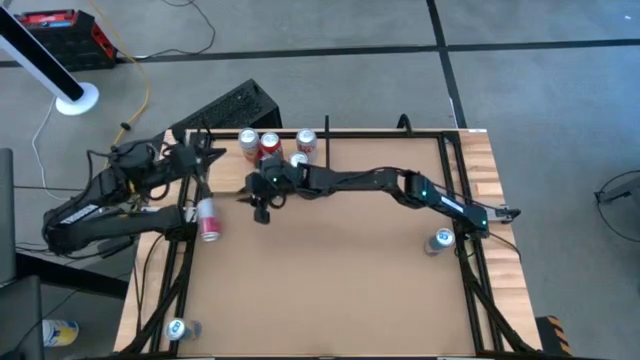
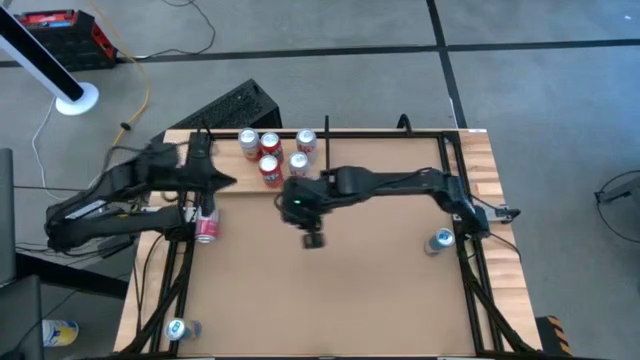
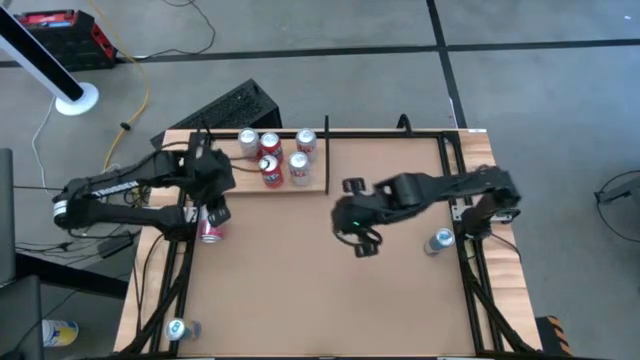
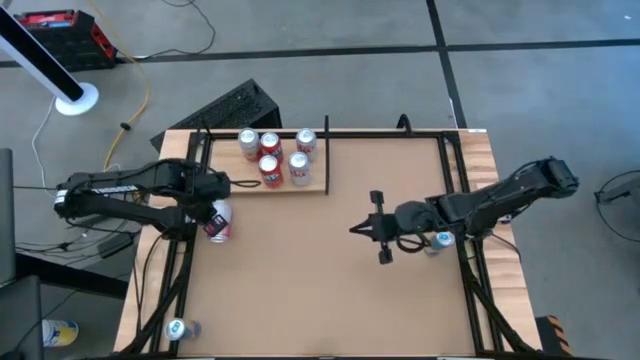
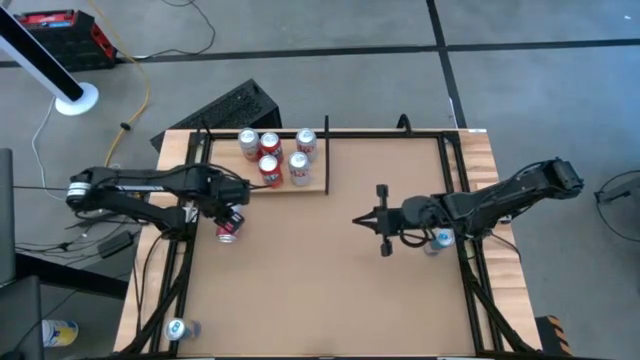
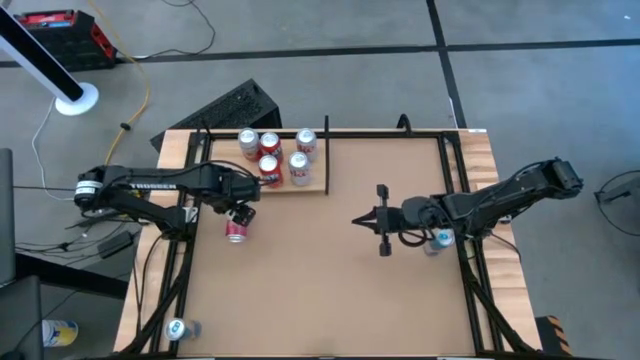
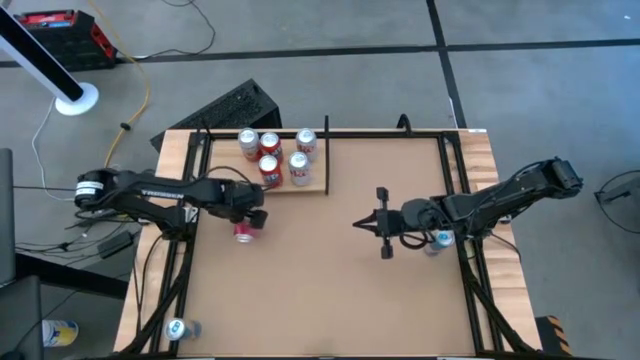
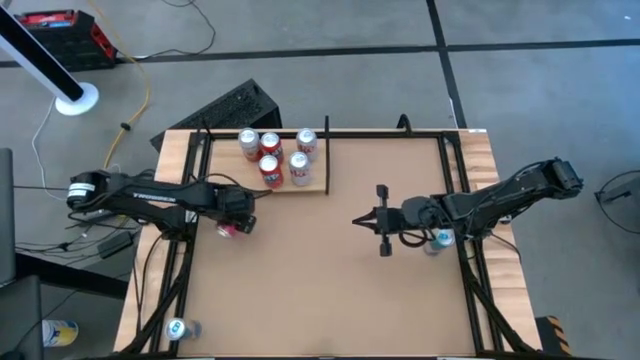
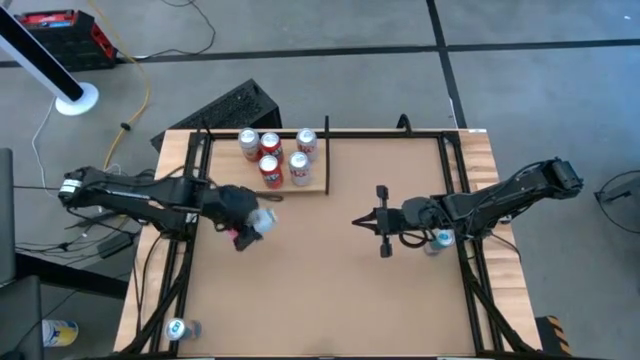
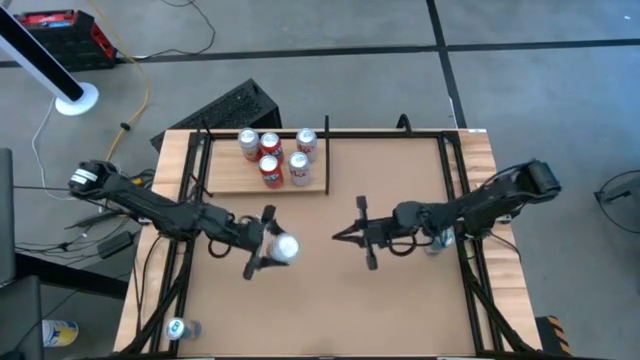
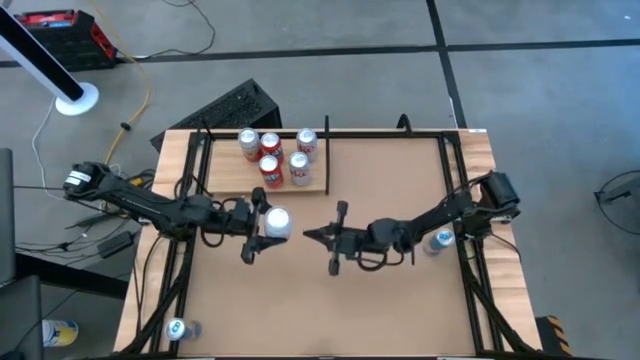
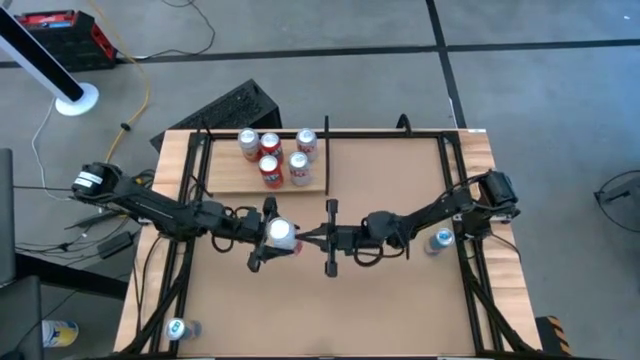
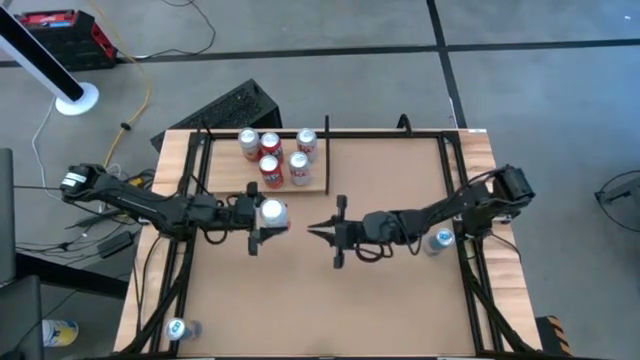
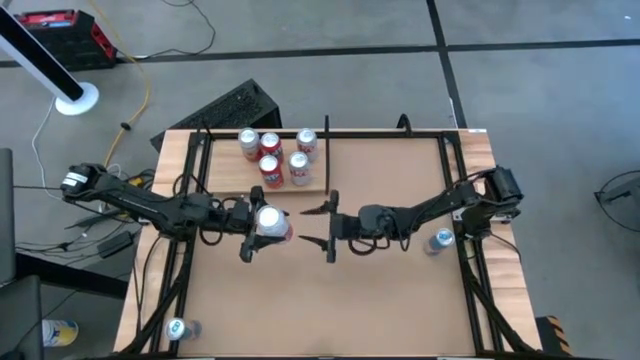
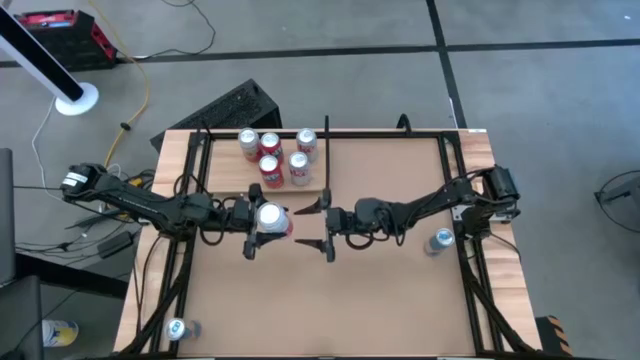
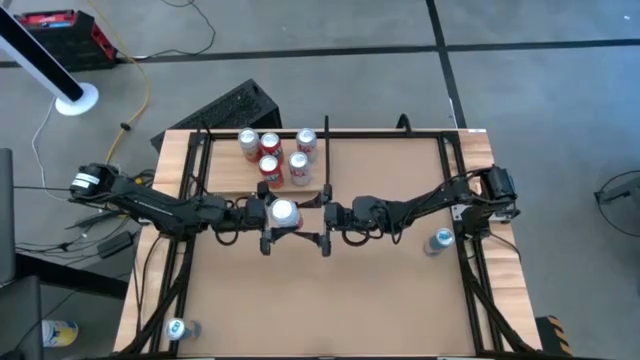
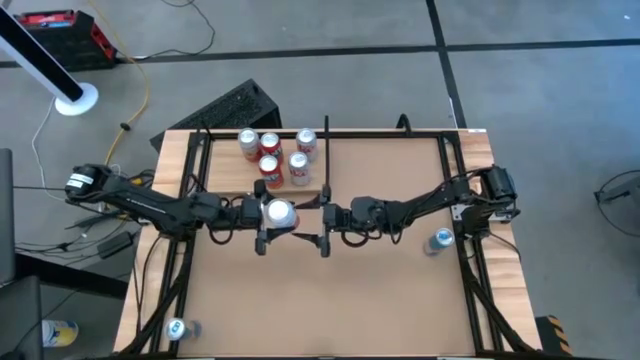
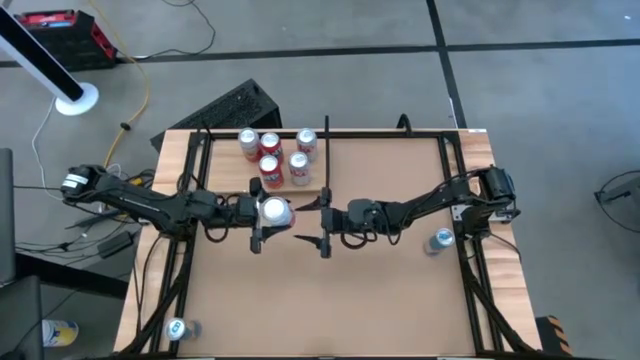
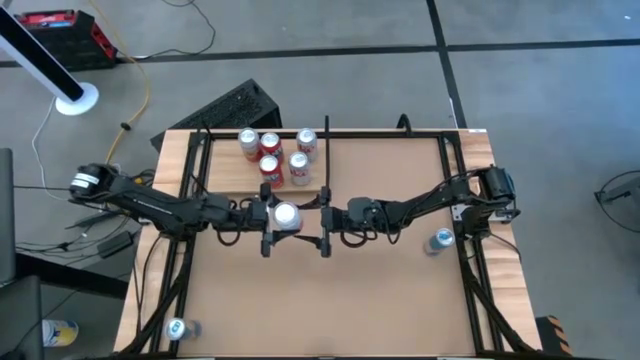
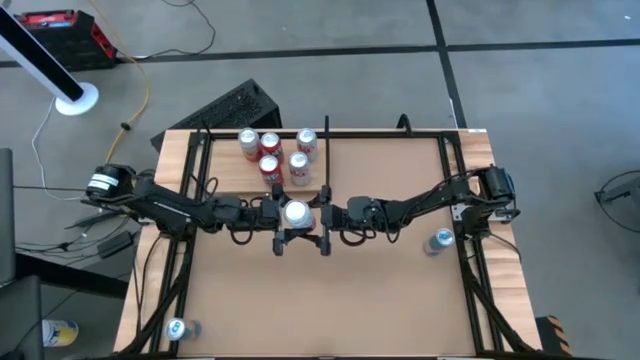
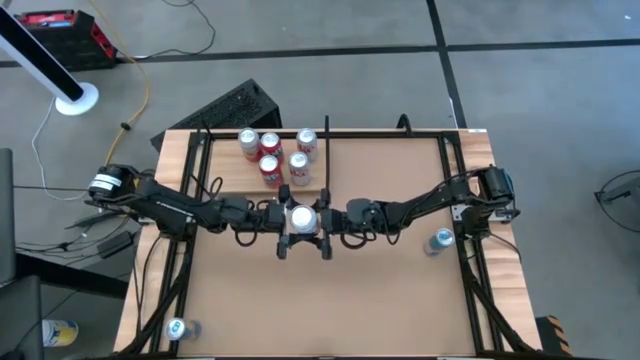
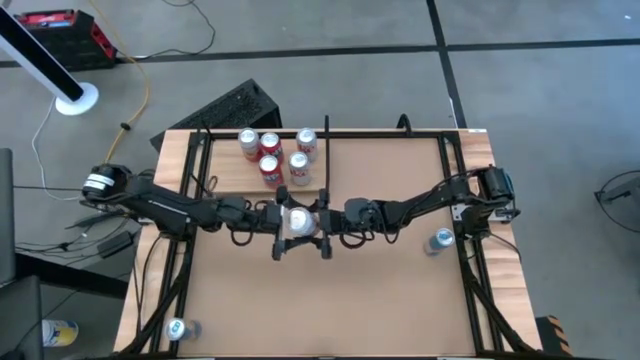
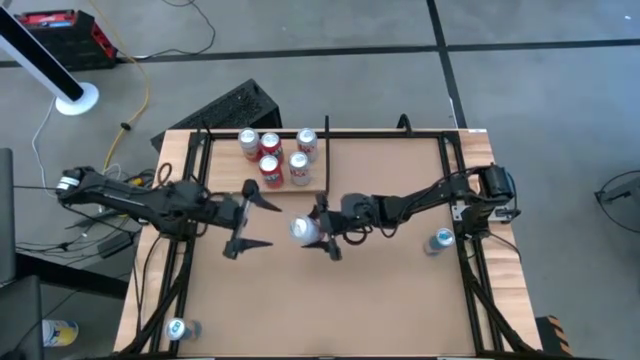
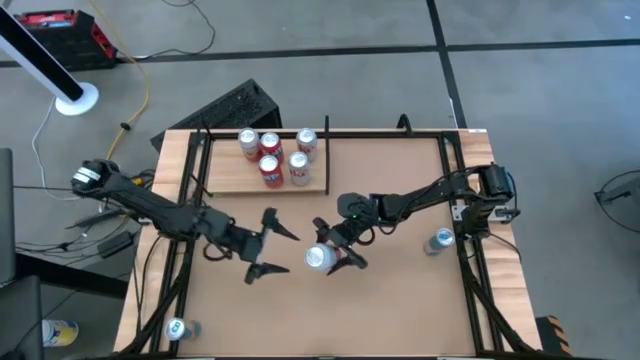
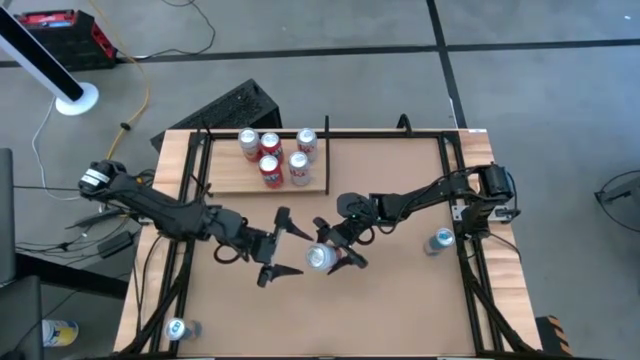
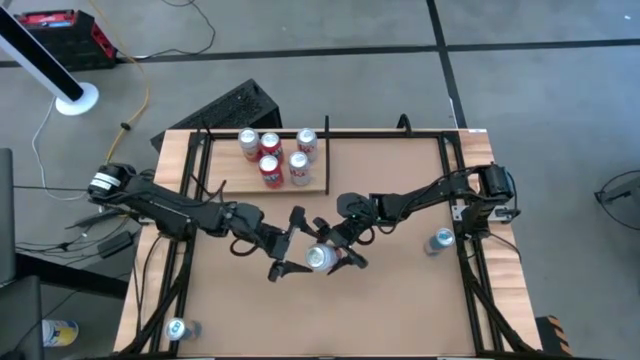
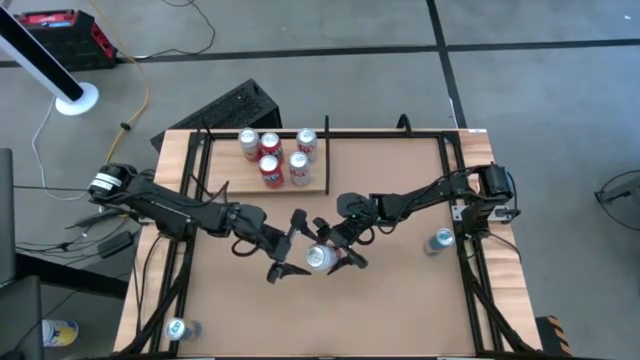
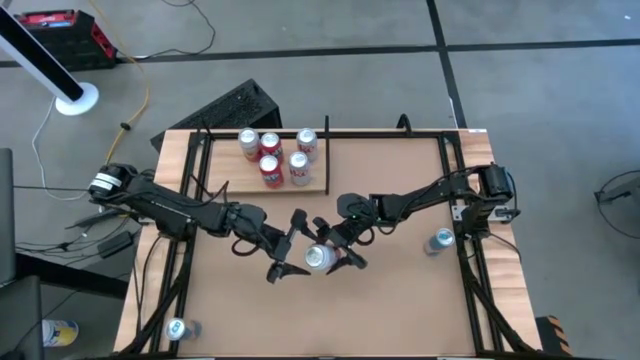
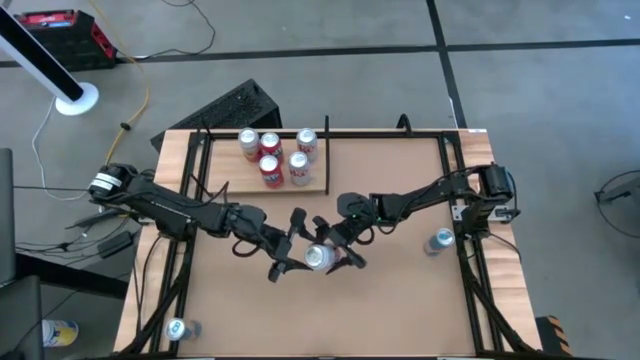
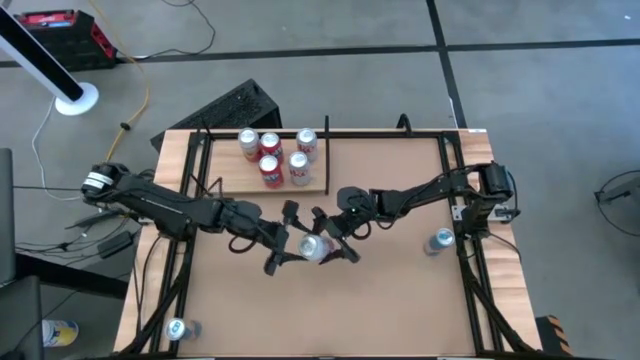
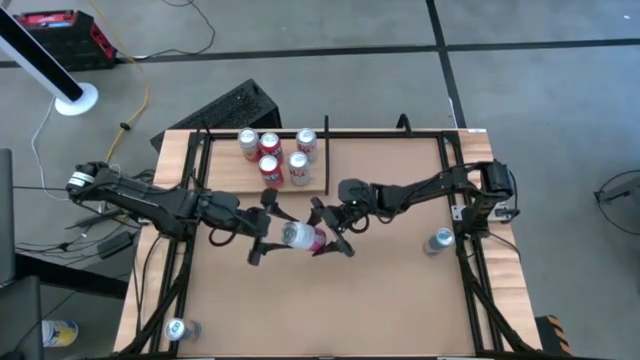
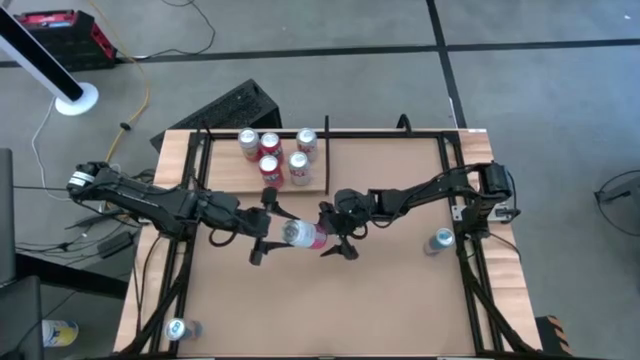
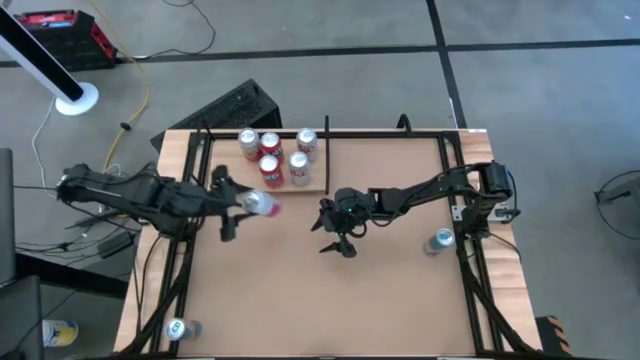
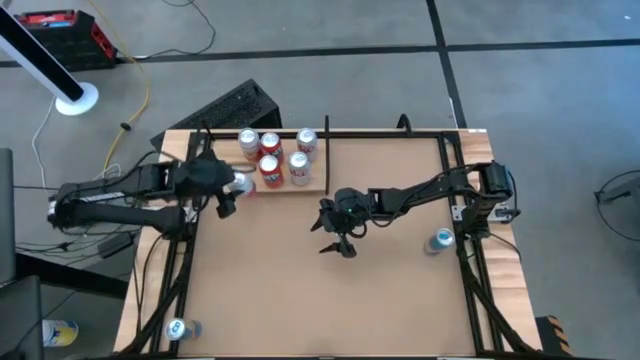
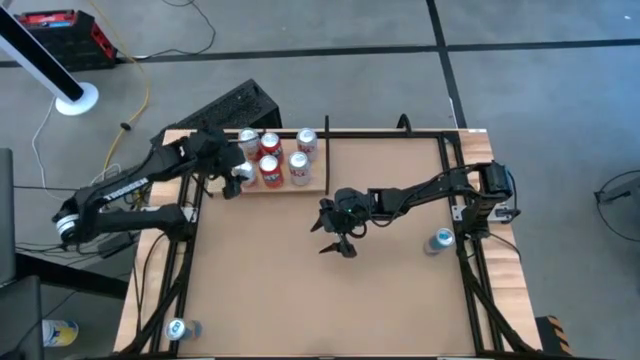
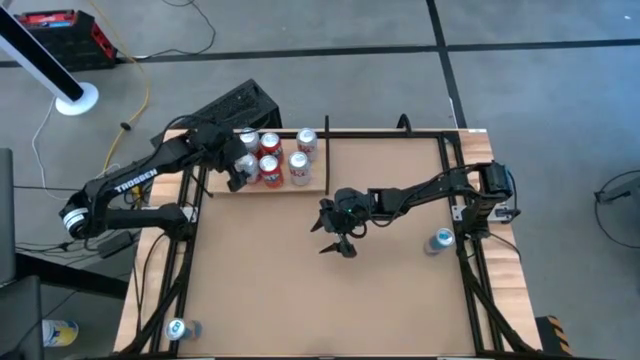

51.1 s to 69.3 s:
Task: Place canned beverage on shelf
Put the pink-white soda can on the shelf aligned with the other pink-white soda can

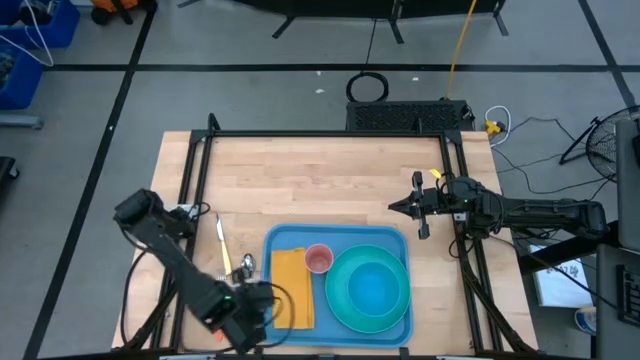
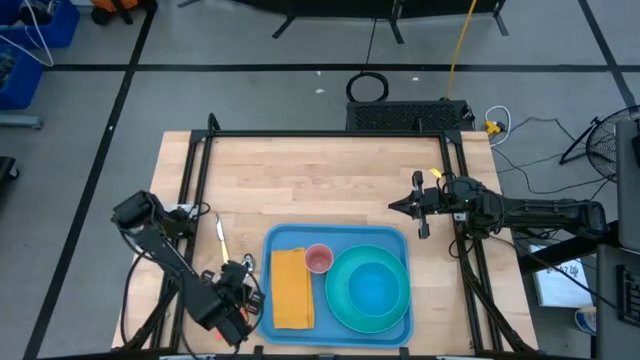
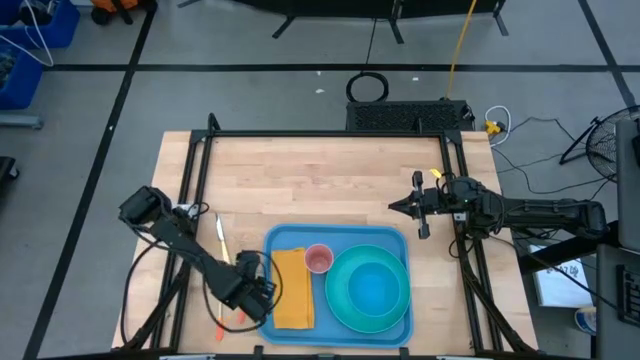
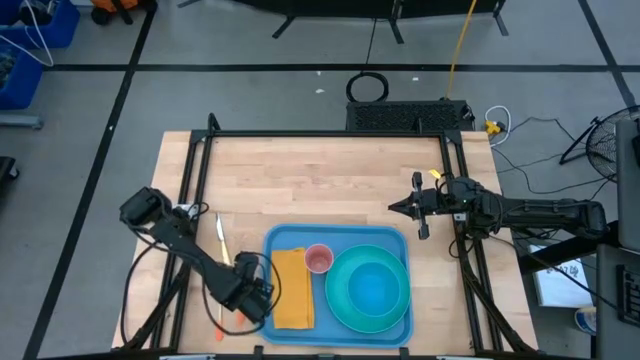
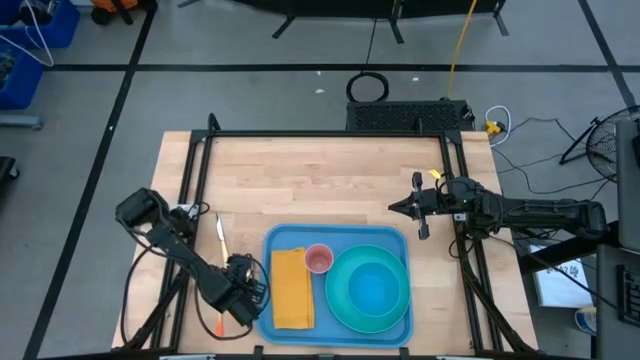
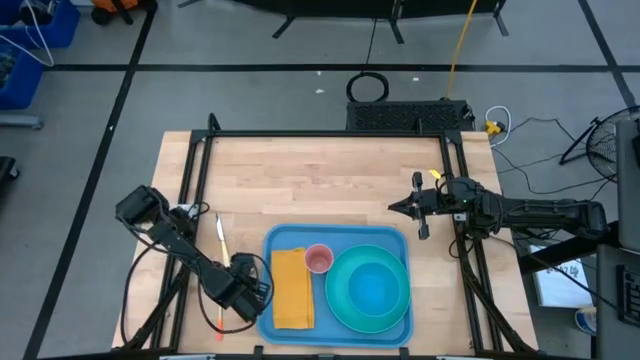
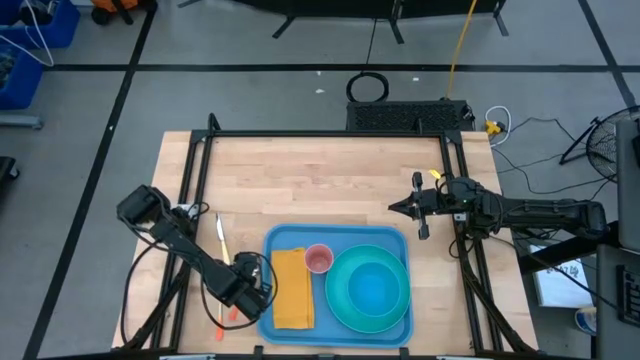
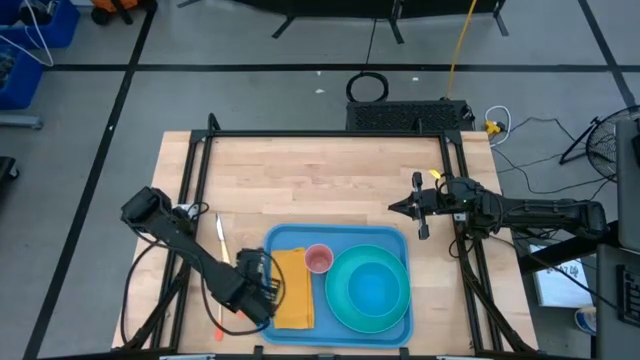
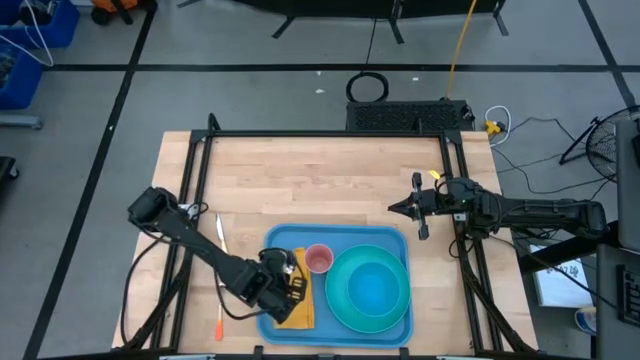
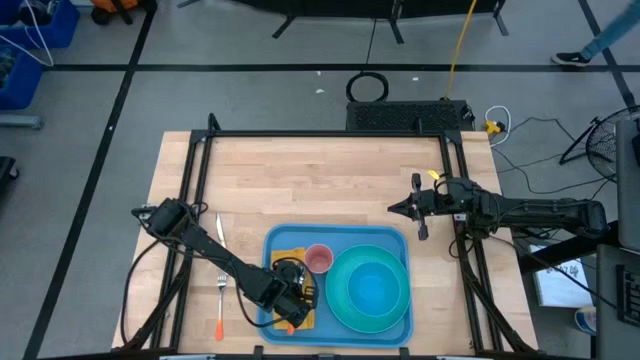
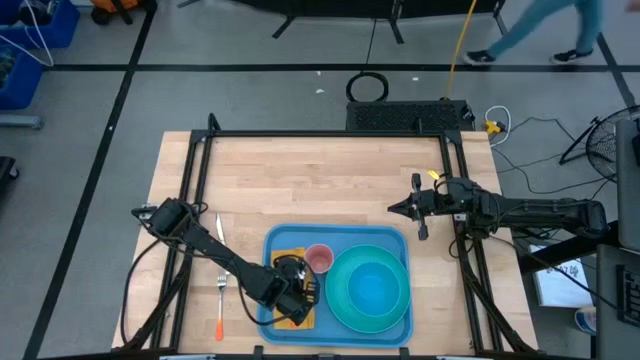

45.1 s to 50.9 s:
Task: Set up tray
Put the orange spoon on the yellow napkin on the blue tray
